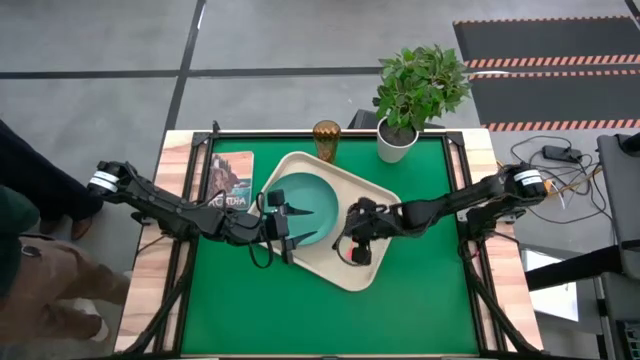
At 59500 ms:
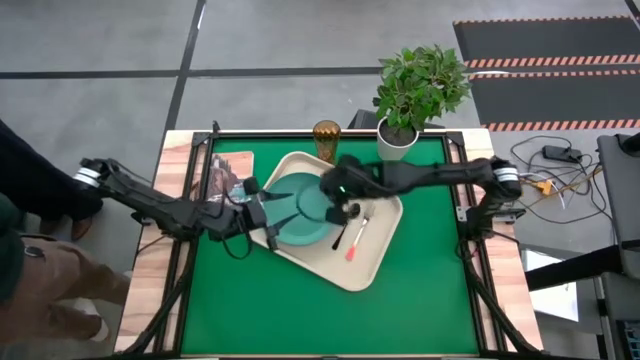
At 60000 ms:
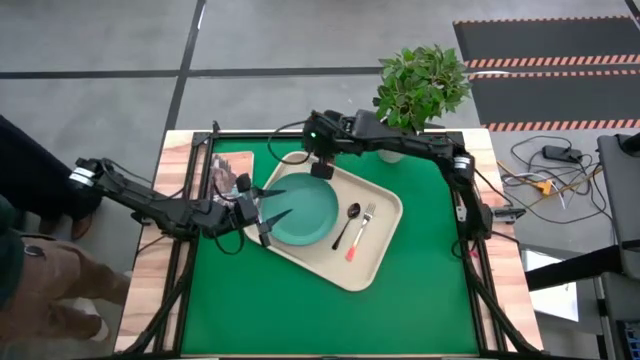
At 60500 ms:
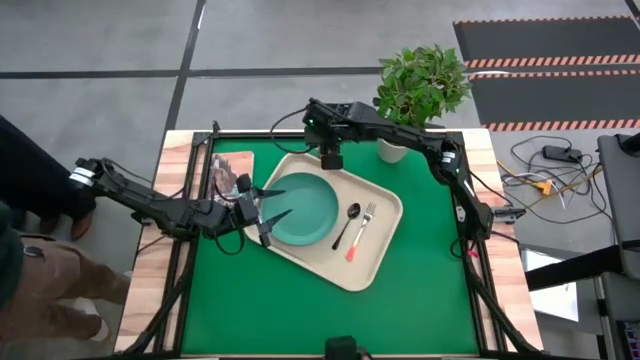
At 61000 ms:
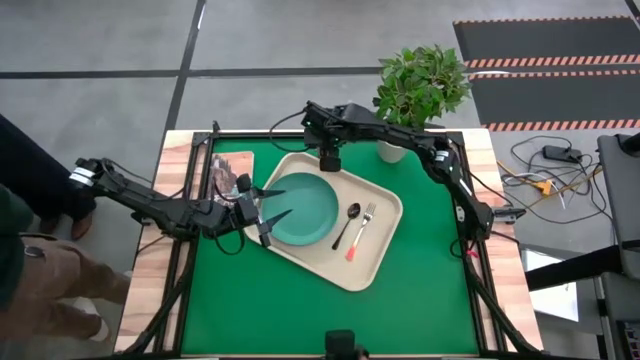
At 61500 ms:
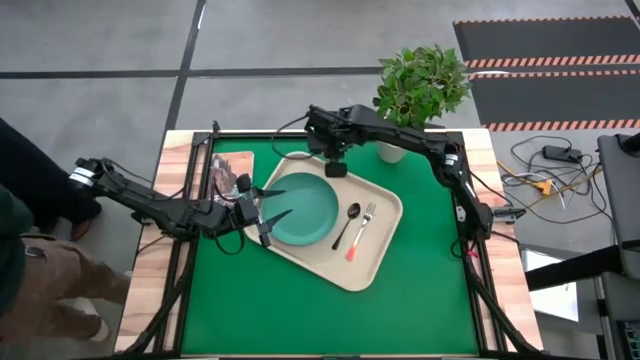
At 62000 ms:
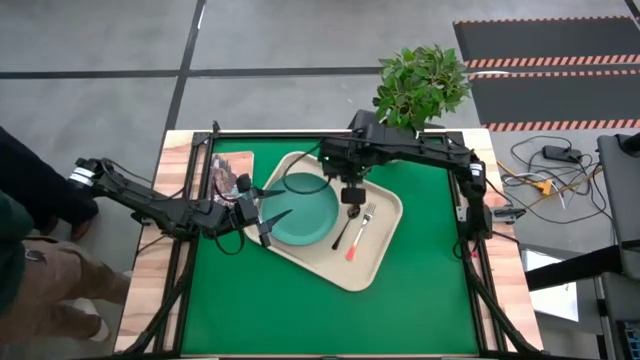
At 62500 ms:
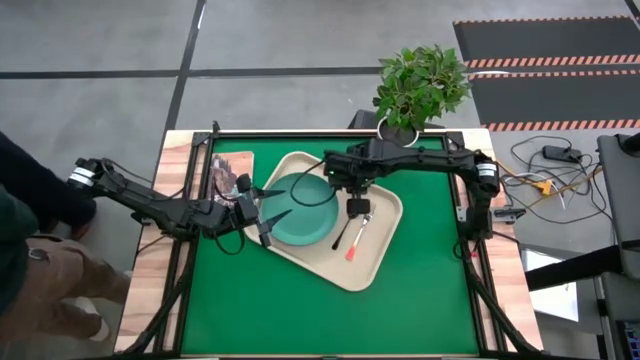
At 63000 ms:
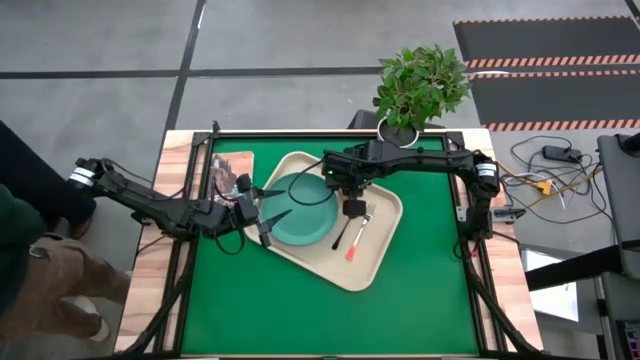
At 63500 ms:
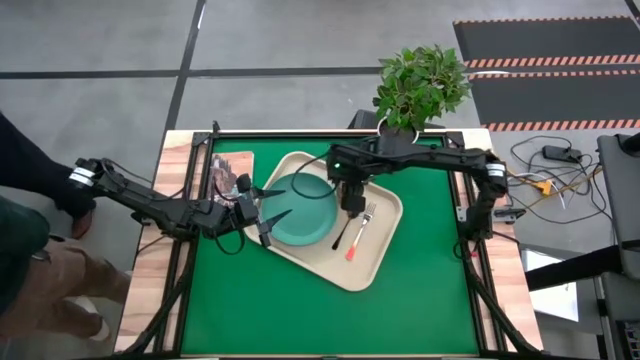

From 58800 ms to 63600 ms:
Task: Pick and place plate/cup/fork/spoon on tray
Put the brown cup on the top right of the green plate

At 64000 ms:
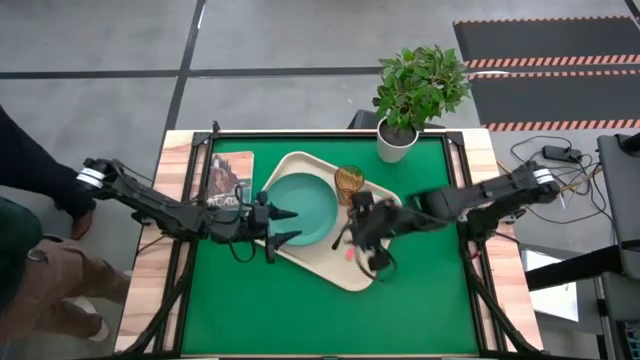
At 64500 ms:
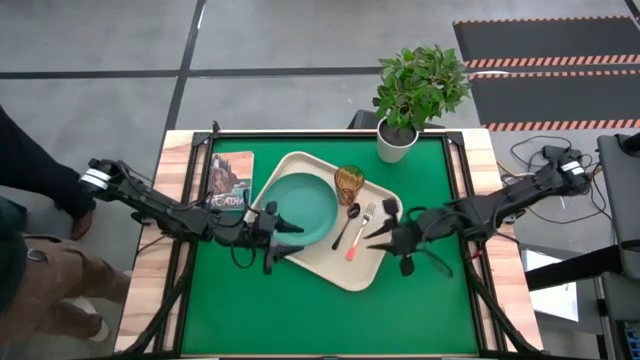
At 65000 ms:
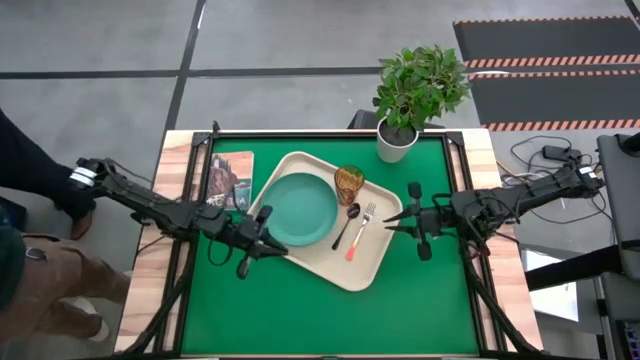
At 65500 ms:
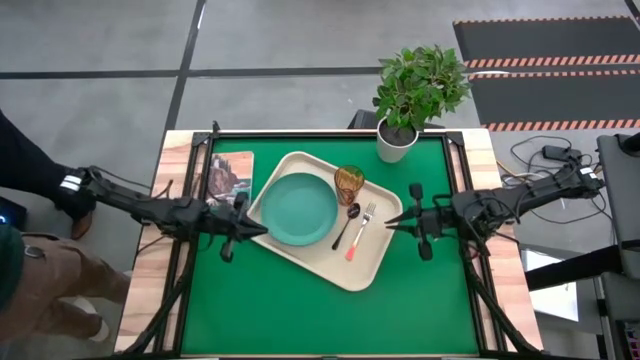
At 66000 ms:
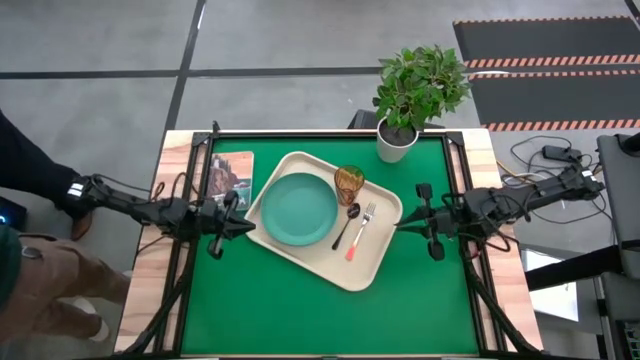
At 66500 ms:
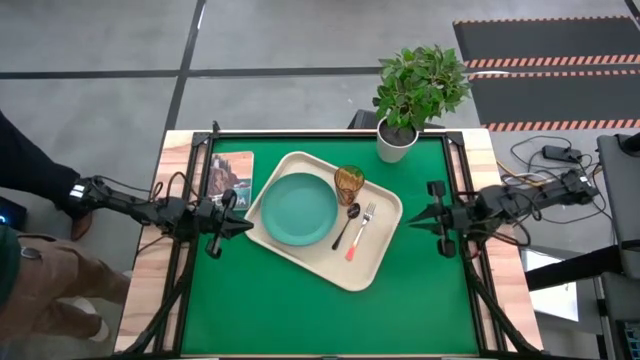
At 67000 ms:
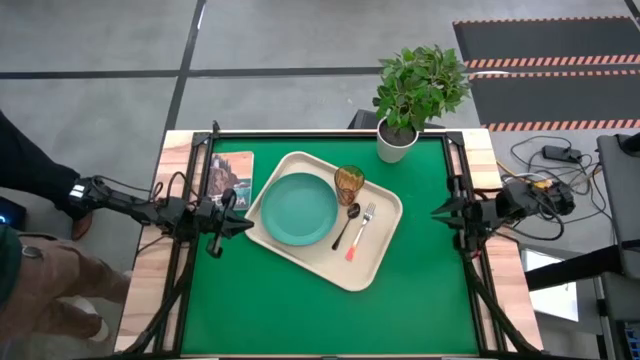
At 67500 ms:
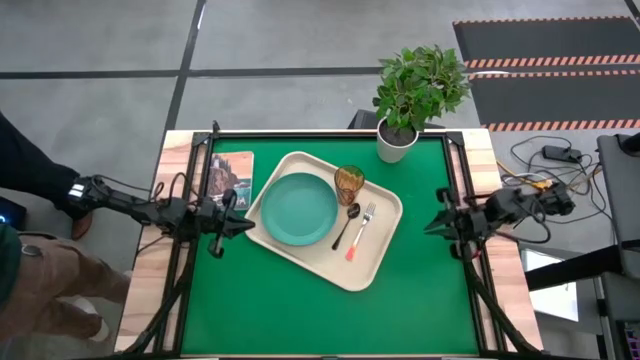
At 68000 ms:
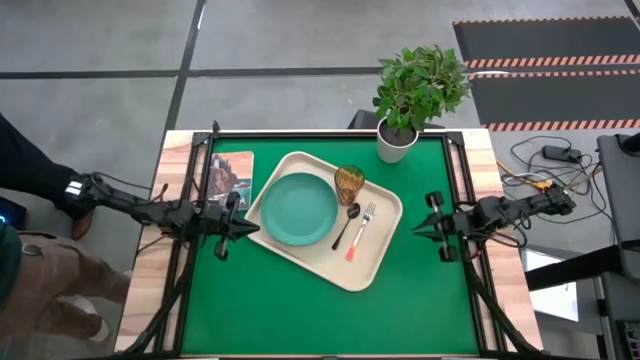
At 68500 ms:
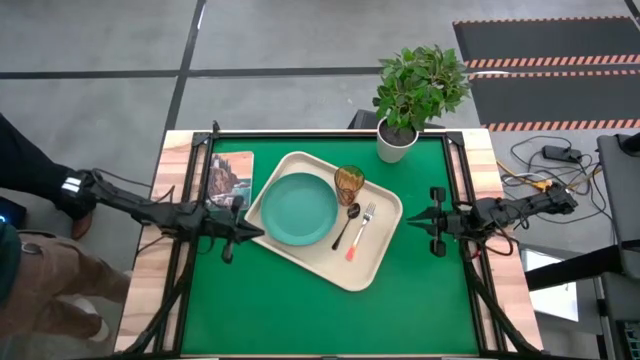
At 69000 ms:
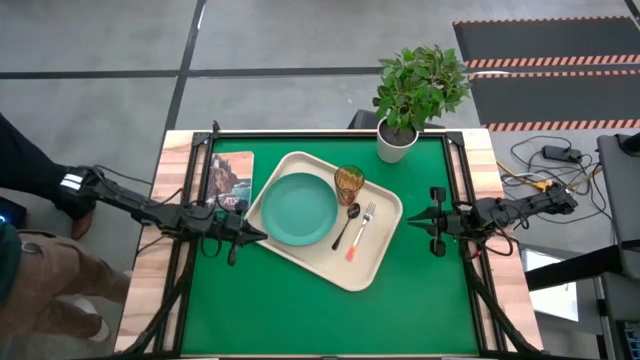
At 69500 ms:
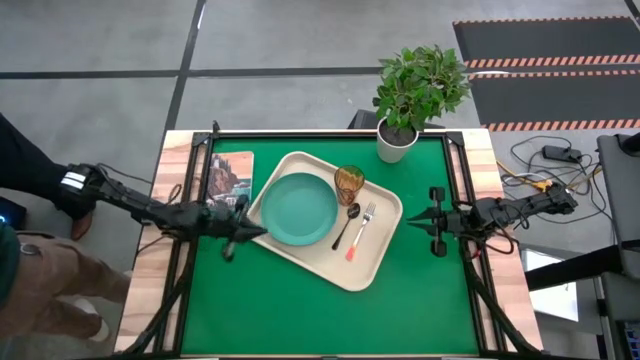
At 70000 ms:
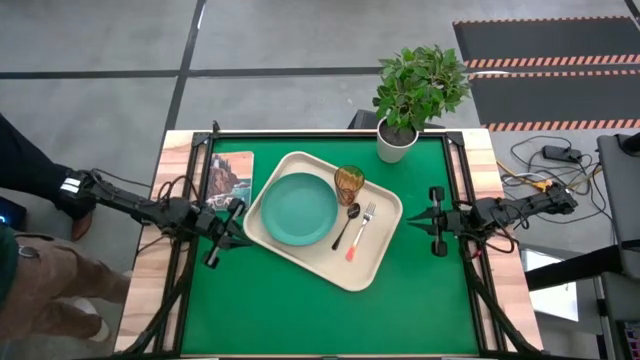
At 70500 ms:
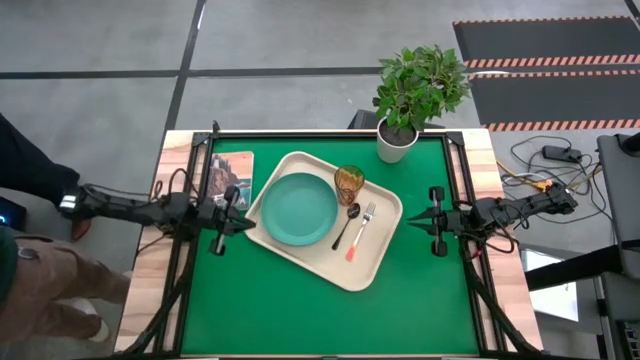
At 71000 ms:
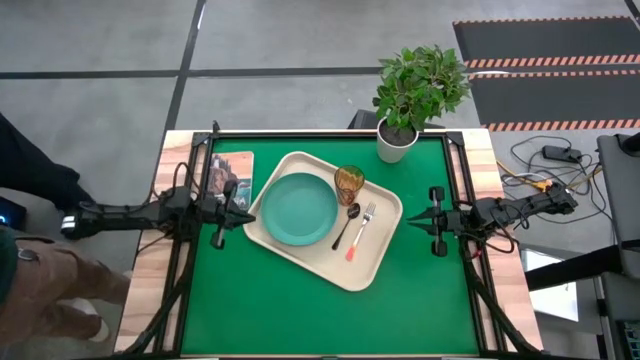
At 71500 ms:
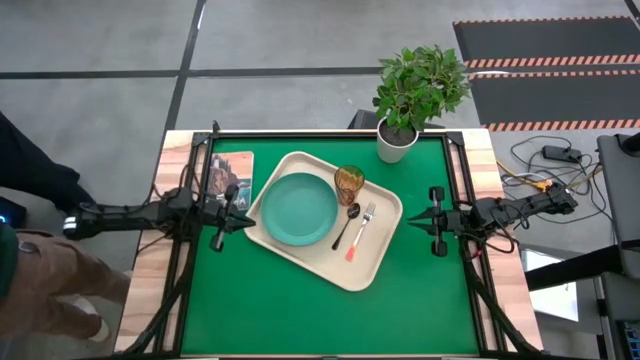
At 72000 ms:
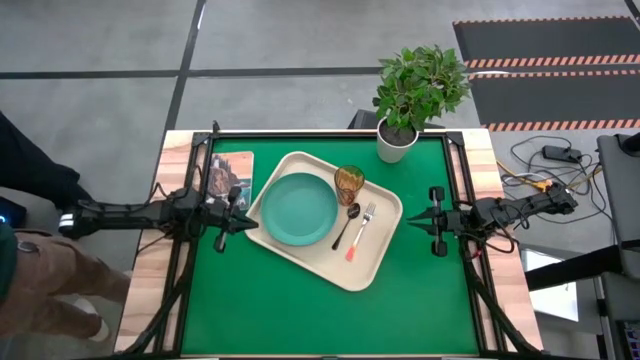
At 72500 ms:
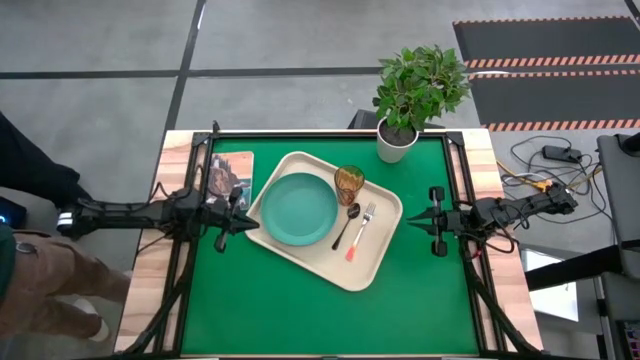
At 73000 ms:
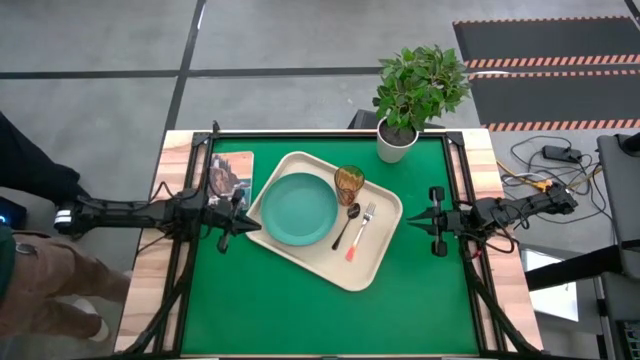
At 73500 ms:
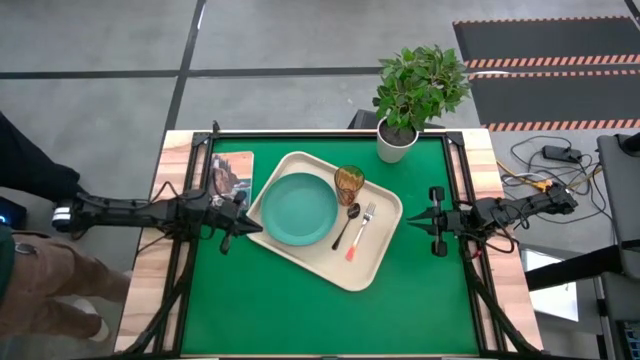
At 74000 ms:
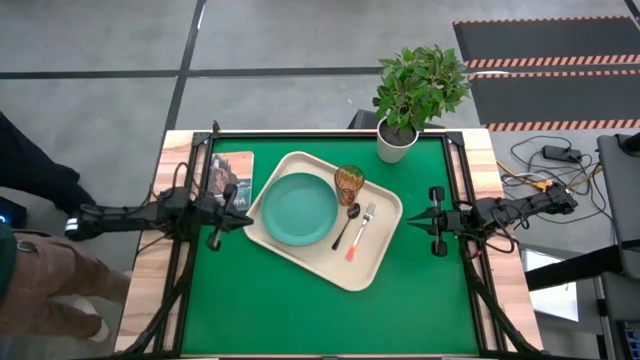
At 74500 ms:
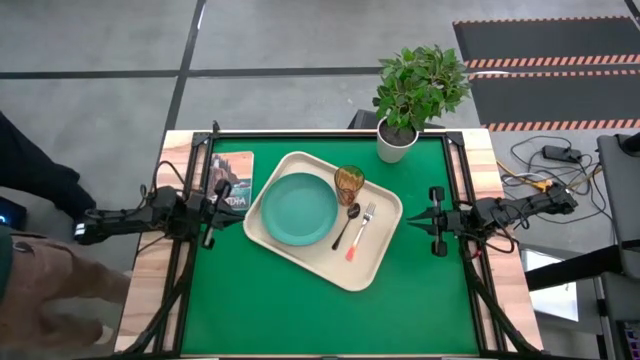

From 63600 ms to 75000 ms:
Return to Home Position

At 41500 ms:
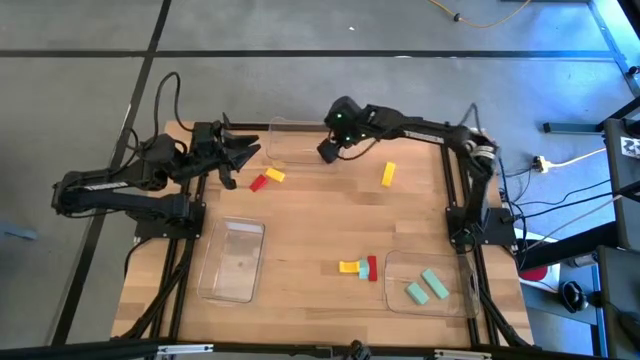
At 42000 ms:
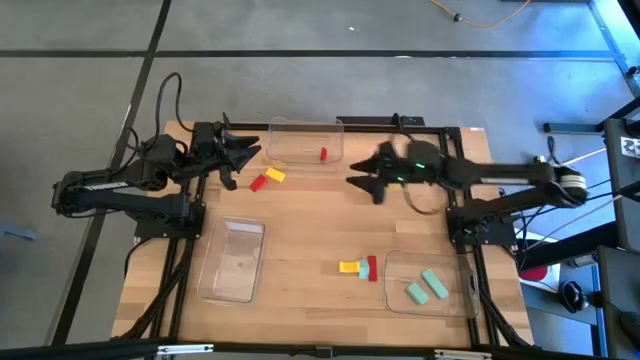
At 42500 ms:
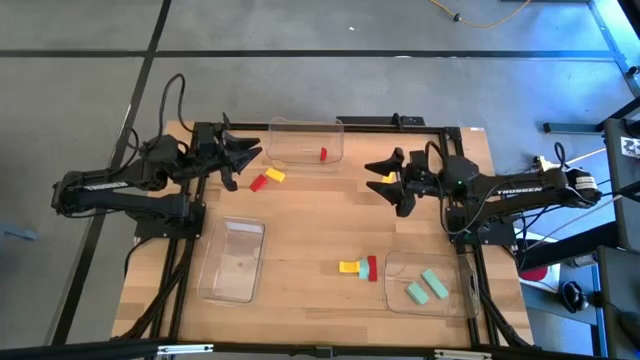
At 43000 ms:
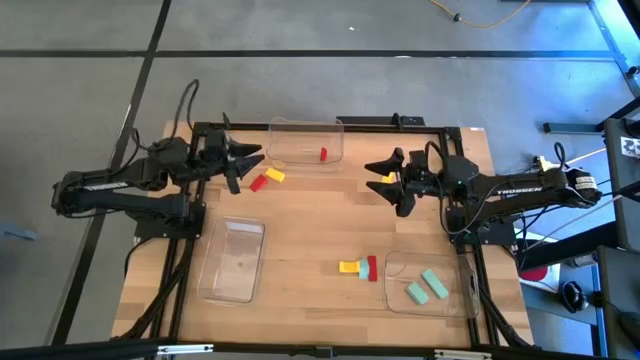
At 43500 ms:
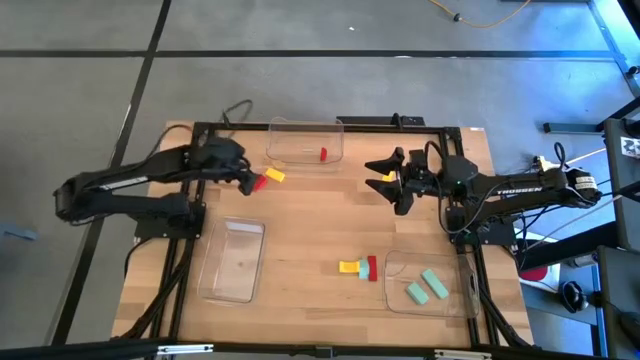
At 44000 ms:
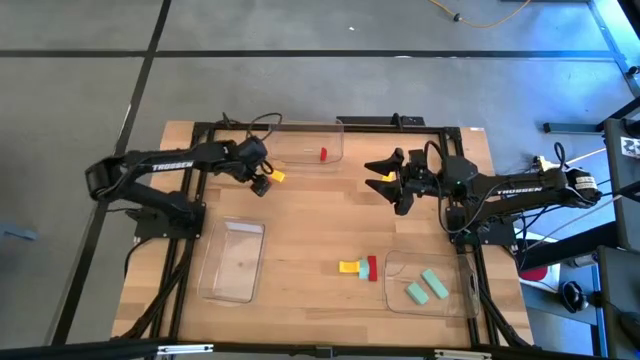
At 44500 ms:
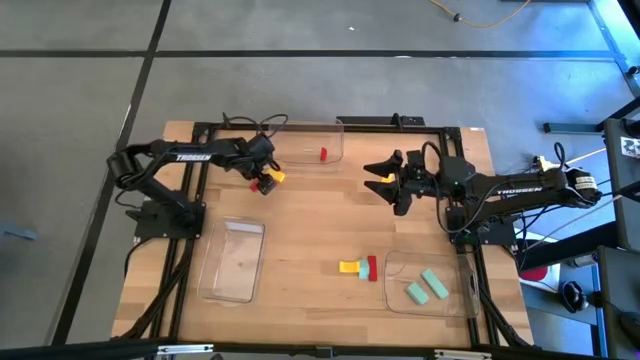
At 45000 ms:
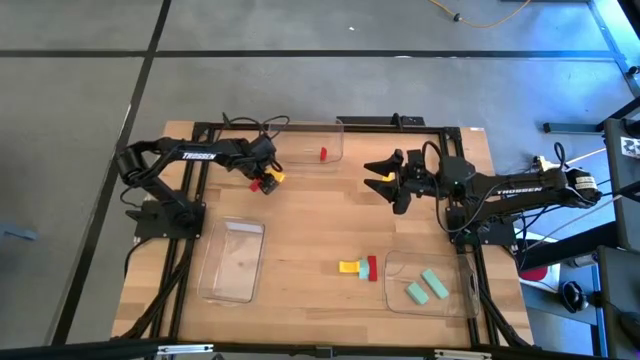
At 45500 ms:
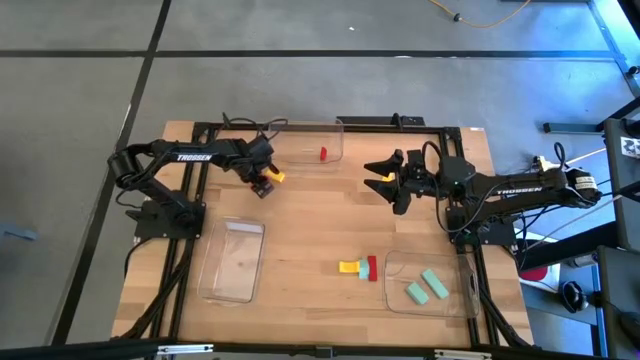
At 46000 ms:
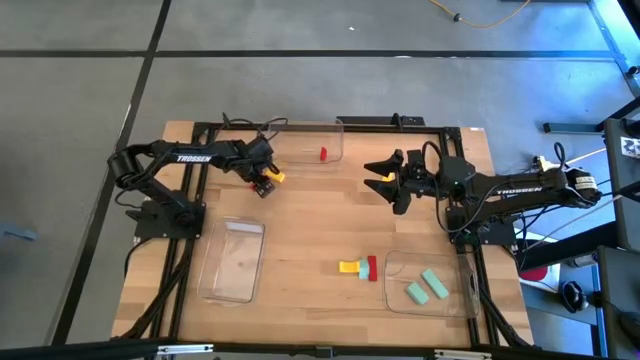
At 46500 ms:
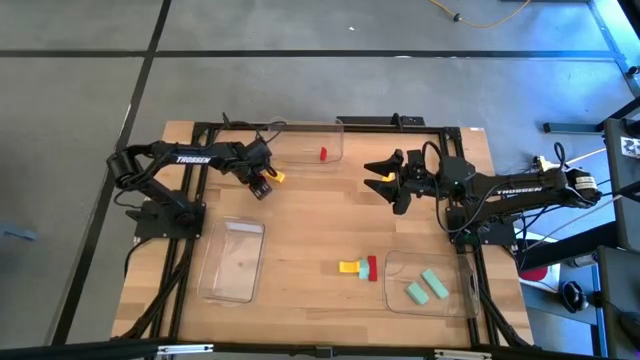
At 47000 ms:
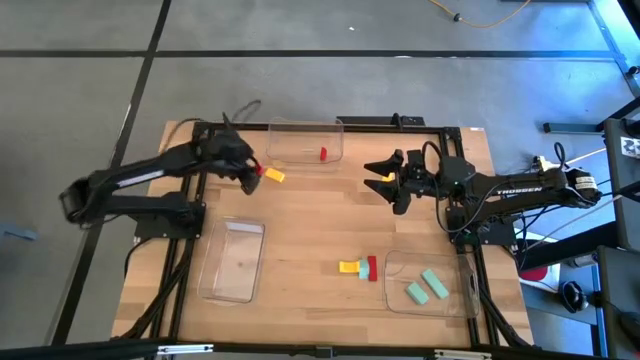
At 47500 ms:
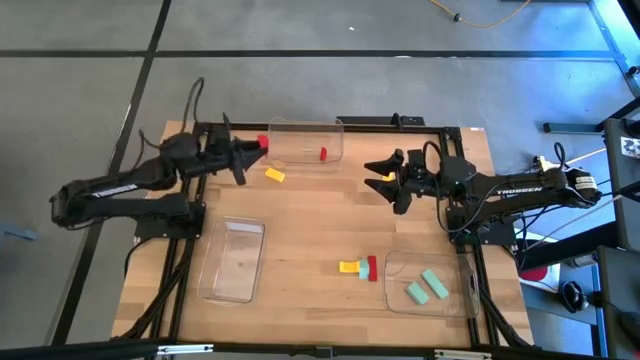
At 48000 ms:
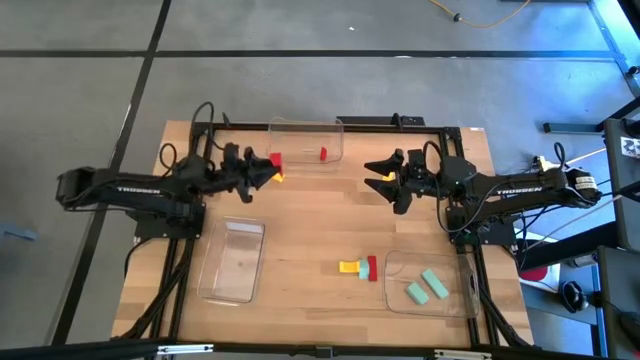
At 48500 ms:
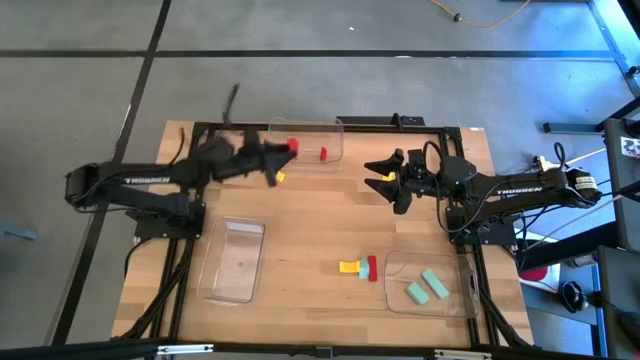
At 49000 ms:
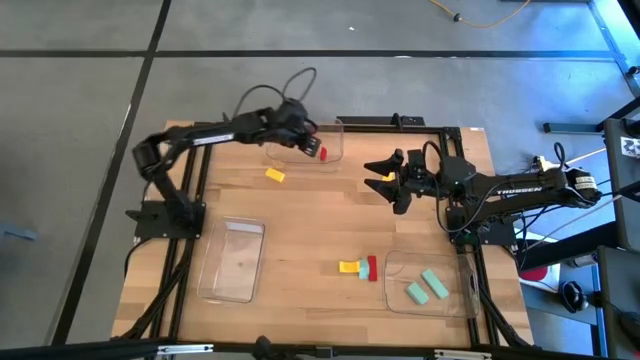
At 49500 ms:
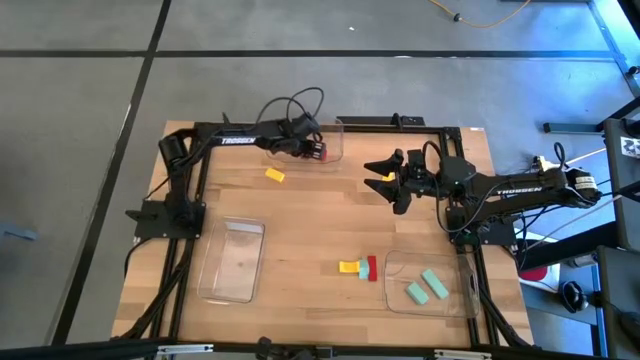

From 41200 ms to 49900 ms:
Task: Sort & place blocks by color
Put the left red block on the top transparent bin
